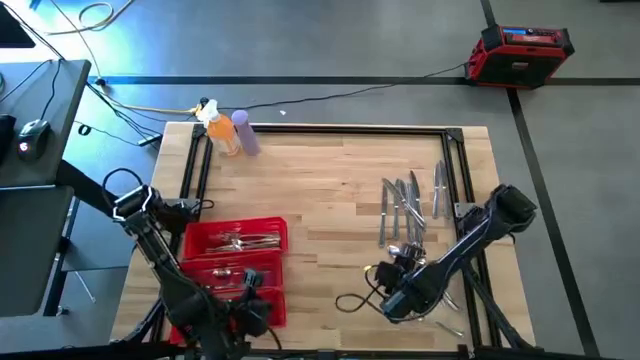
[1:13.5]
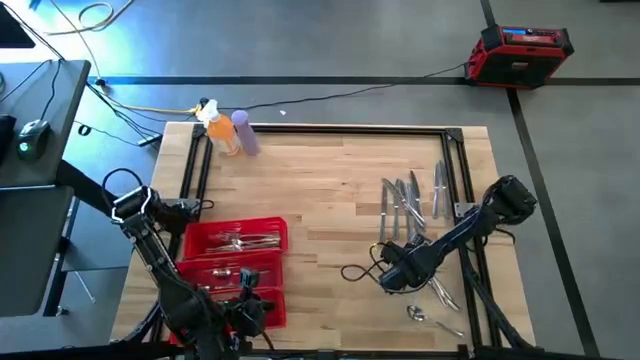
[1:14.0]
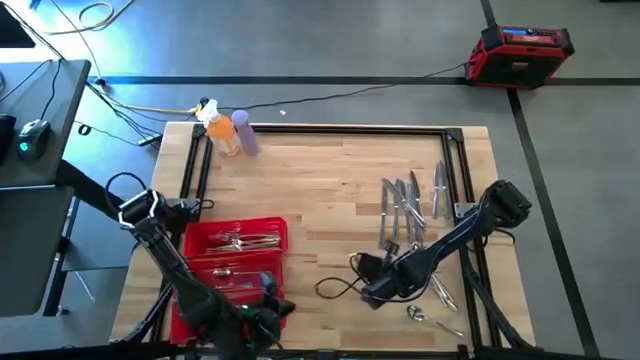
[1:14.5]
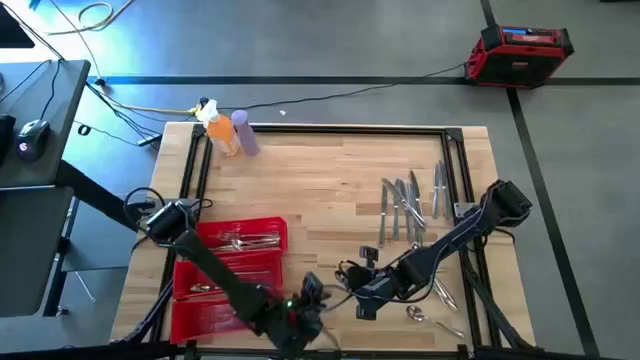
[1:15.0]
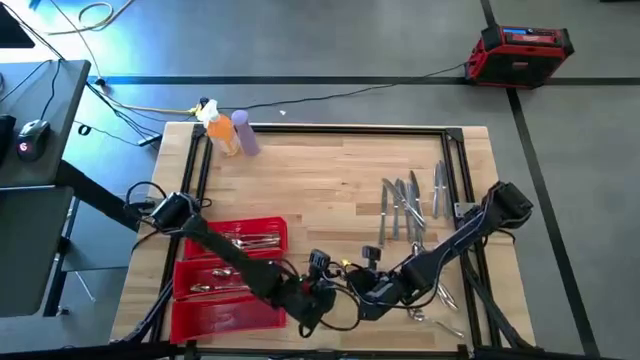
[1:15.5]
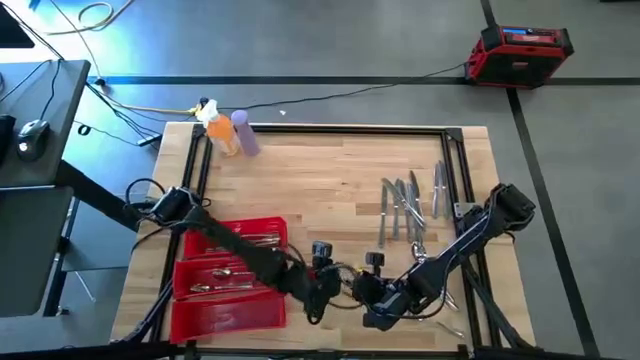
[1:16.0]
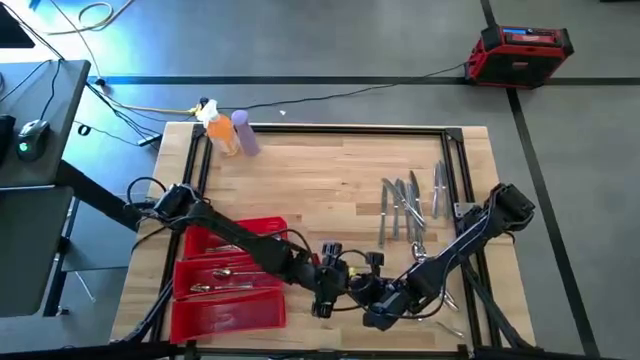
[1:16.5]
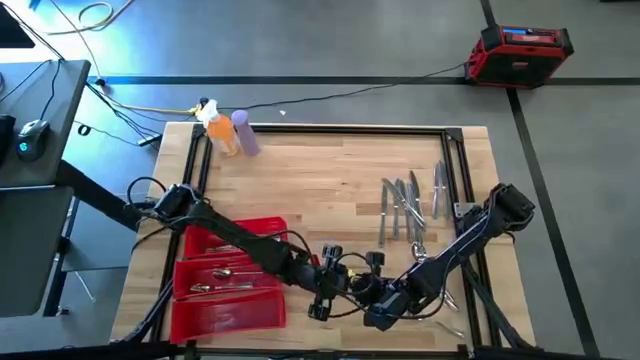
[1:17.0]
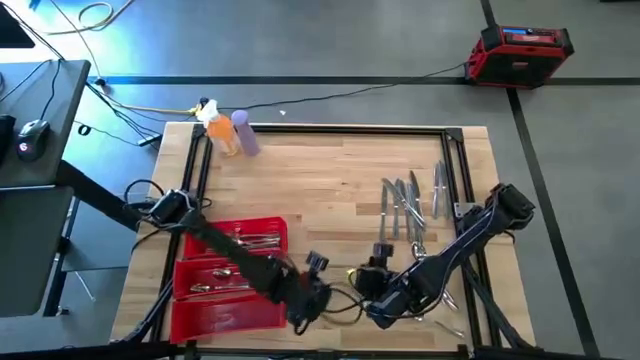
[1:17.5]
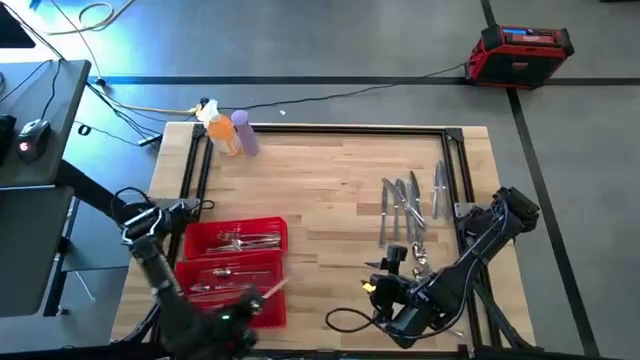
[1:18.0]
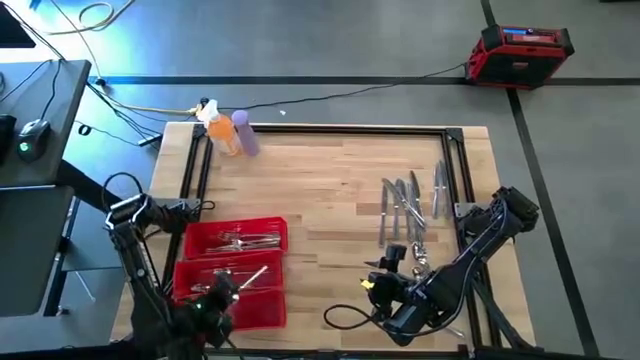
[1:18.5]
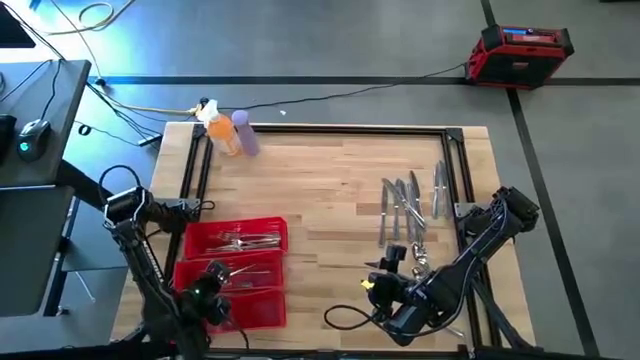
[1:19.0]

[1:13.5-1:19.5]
Task: Sort silverware
Put the silver spoon in the middle red bin

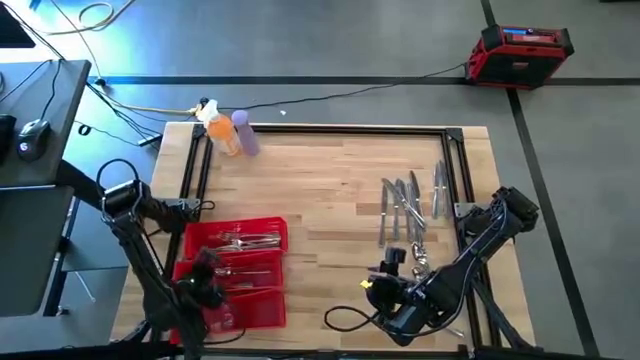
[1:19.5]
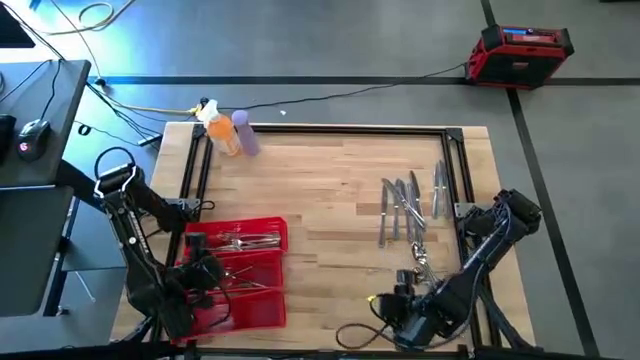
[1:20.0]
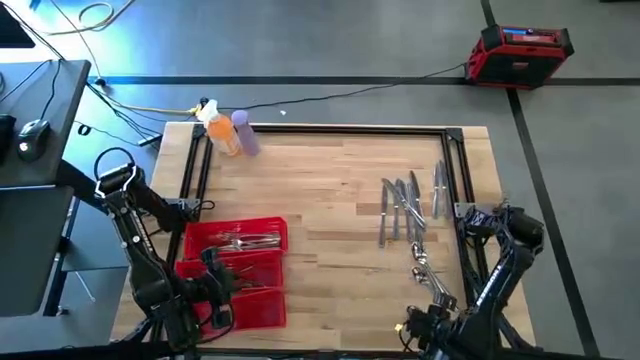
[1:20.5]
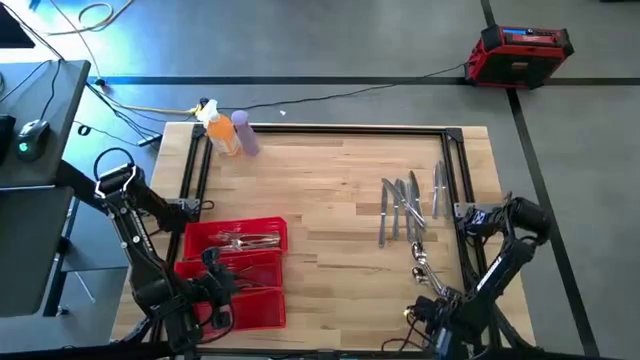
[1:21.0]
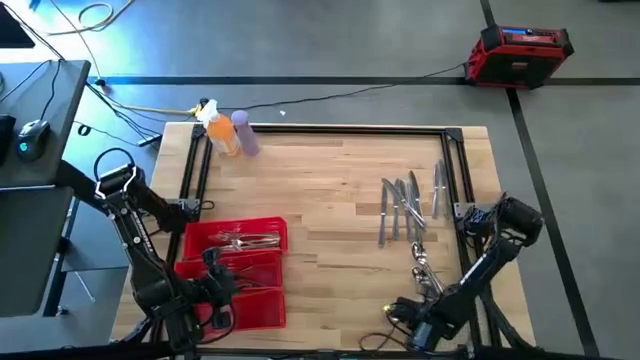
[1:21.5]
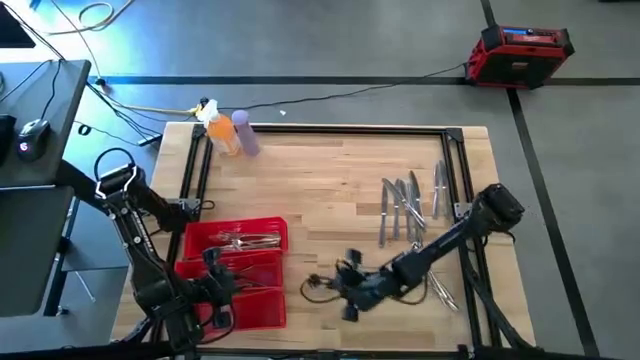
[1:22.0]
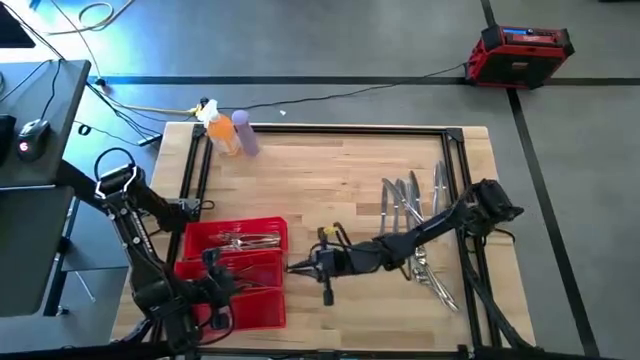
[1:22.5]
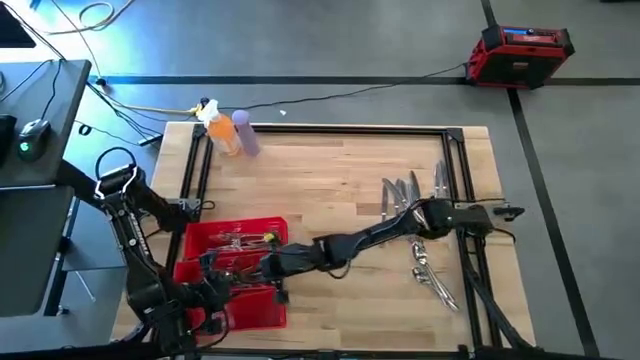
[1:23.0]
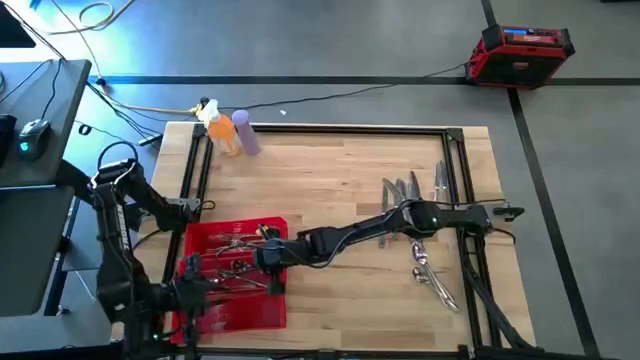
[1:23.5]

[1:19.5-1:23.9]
Put the silver spoon in the middle red bin

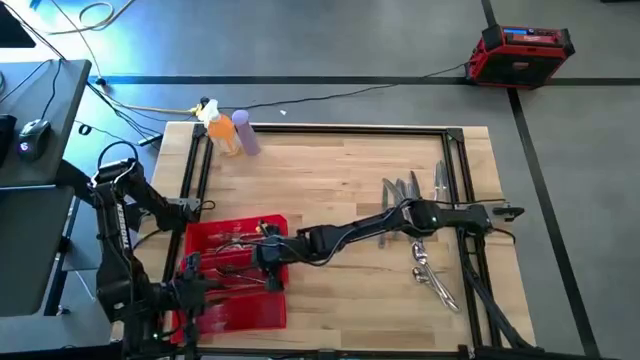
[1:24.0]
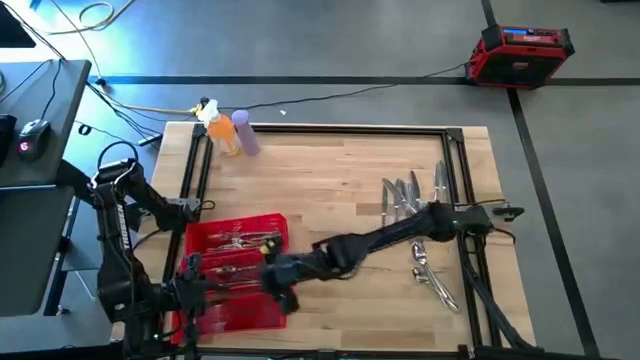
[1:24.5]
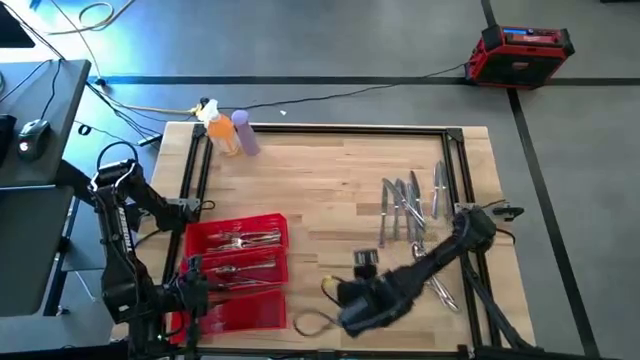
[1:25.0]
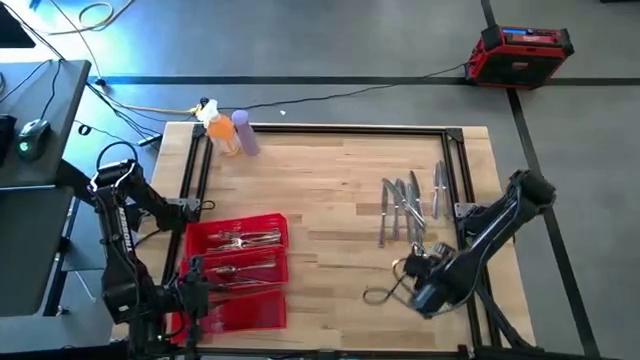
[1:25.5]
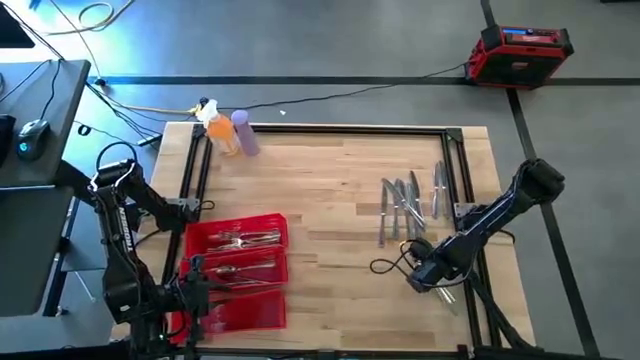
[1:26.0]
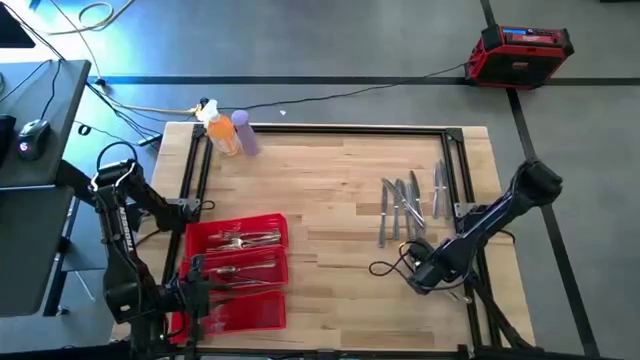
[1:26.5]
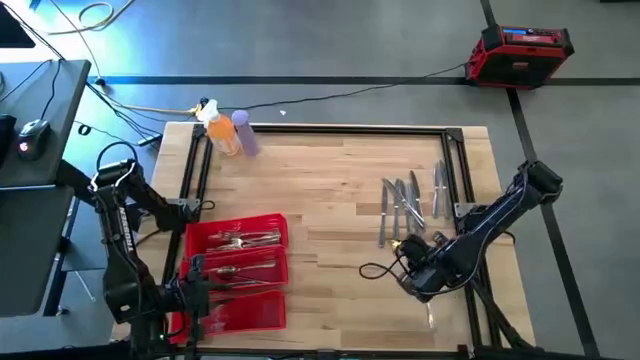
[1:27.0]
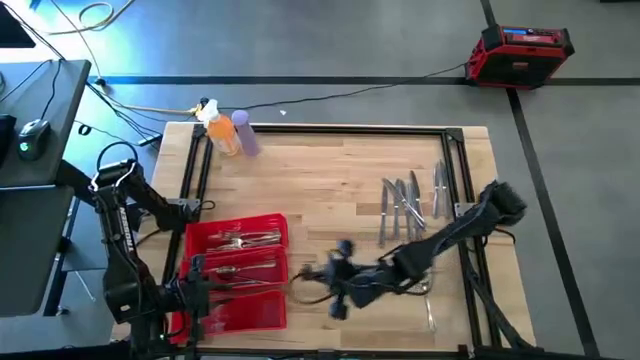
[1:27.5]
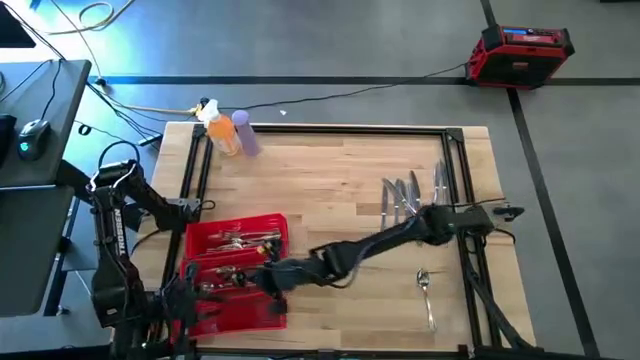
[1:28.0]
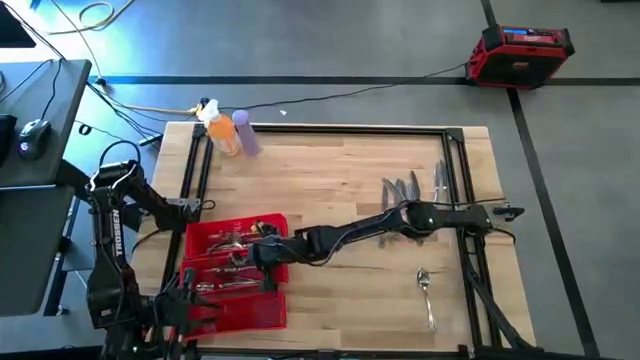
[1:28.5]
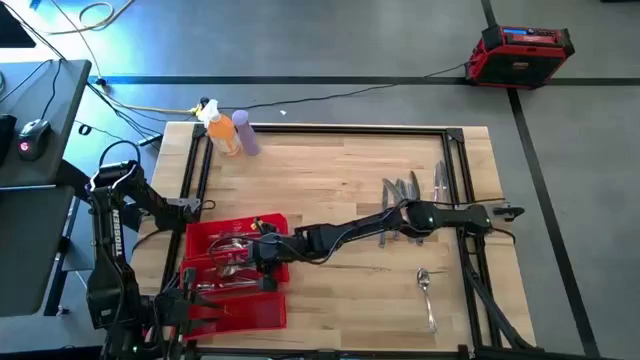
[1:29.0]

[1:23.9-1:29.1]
Put the silver spoon in the middle red bin

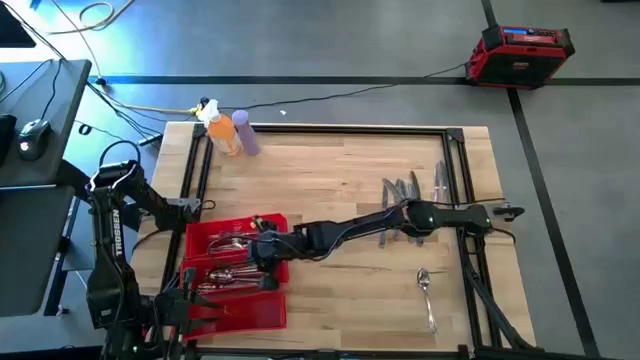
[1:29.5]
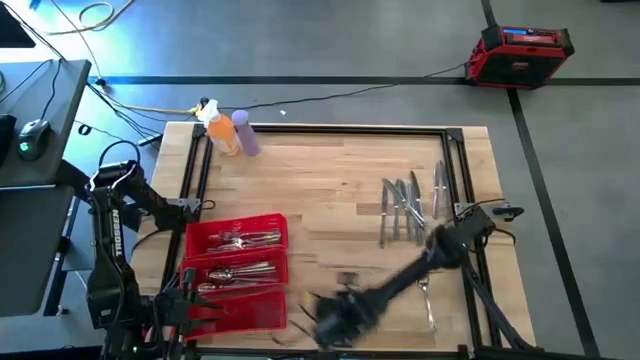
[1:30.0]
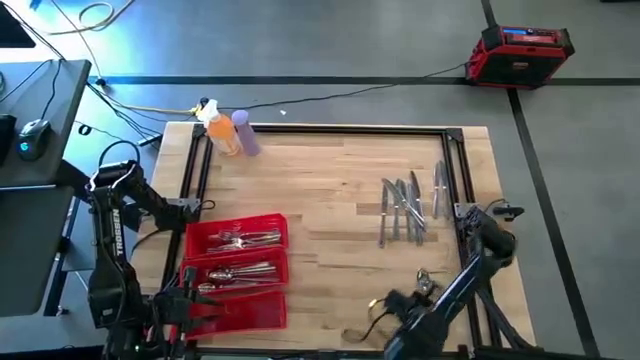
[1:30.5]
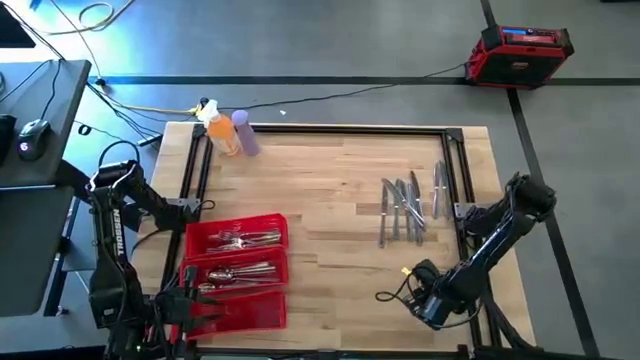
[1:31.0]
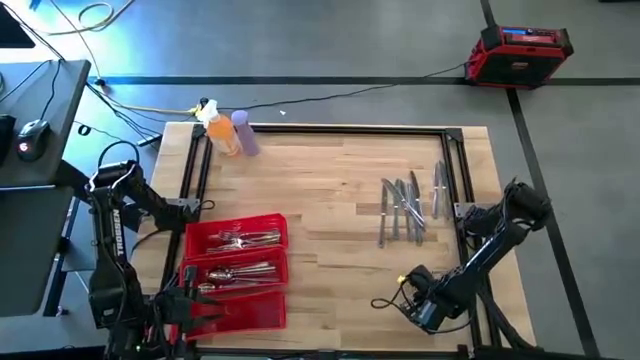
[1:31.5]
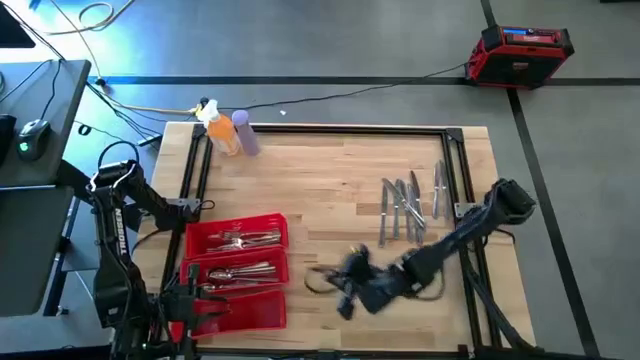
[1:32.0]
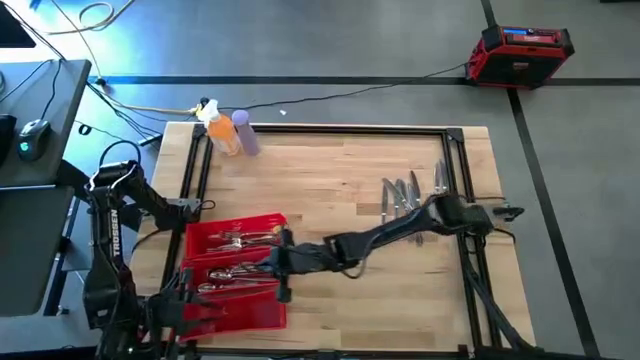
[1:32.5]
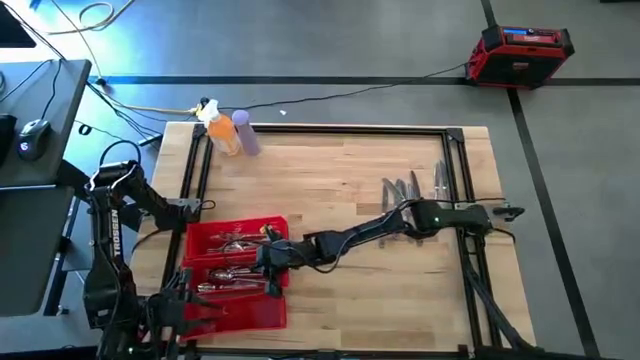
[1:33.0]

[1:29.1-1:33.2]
Put the silver spoon in the middle red bin

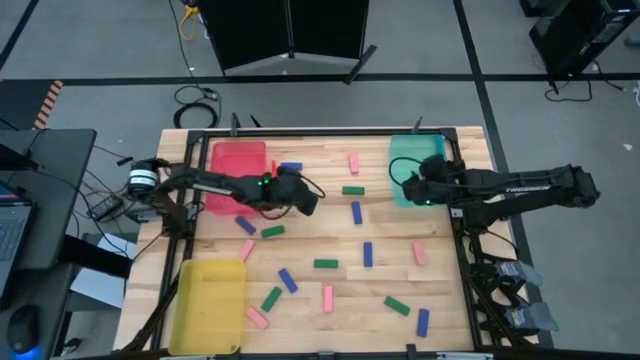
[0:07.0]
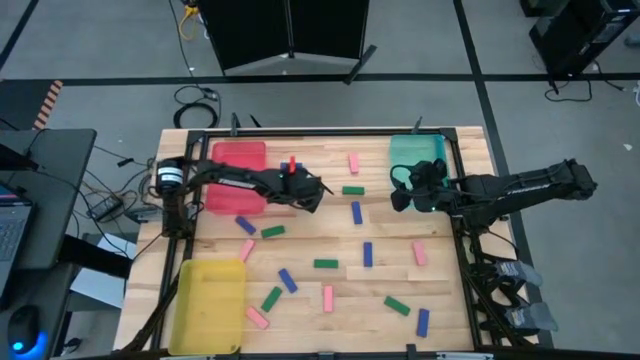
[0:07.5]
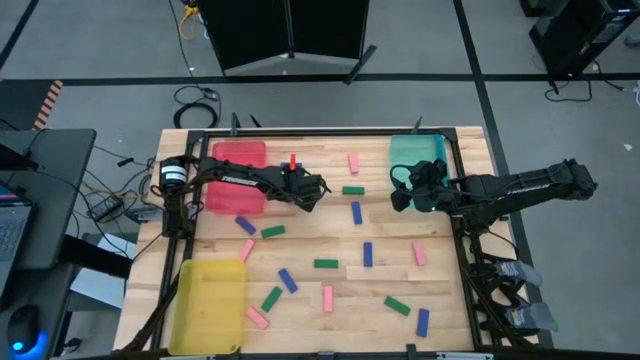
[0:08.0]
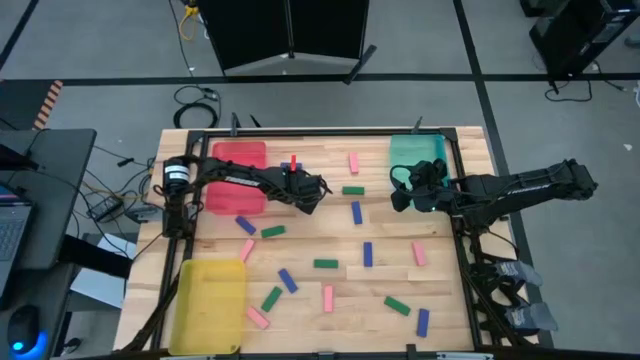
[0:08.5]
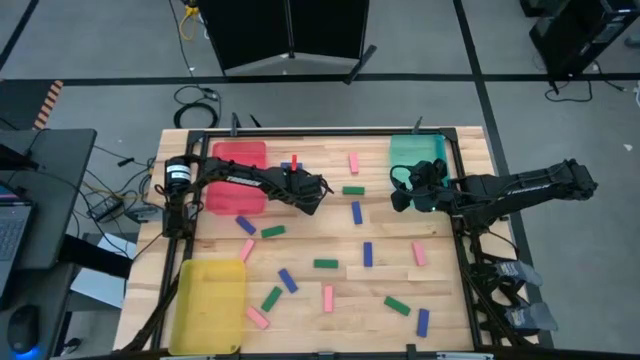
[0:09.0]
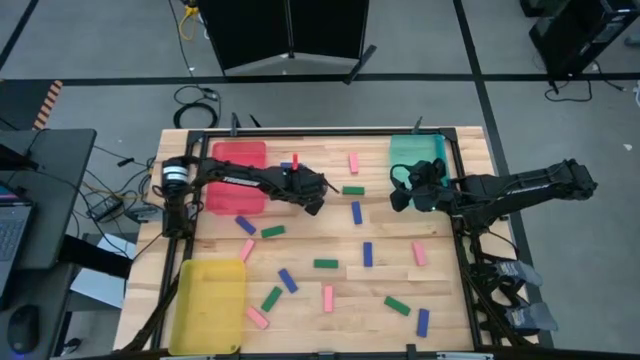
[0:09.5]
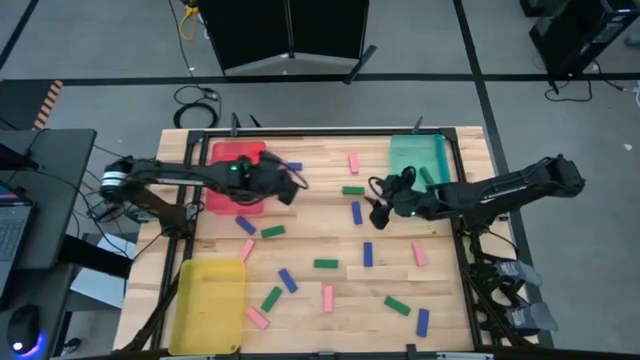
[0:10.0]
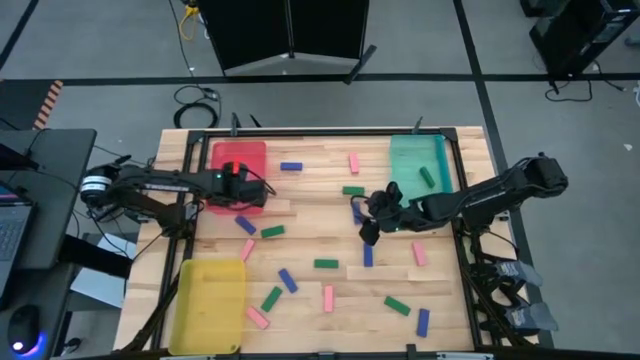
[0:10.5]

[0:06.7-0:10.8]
Task: Sort blocks
Put the pink block into the red bin
